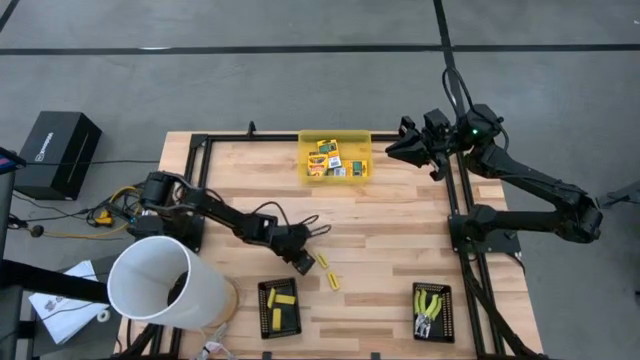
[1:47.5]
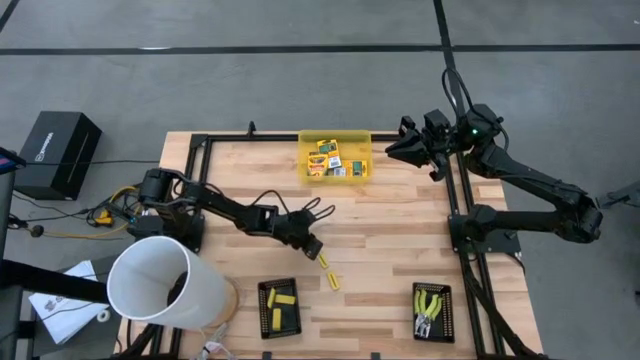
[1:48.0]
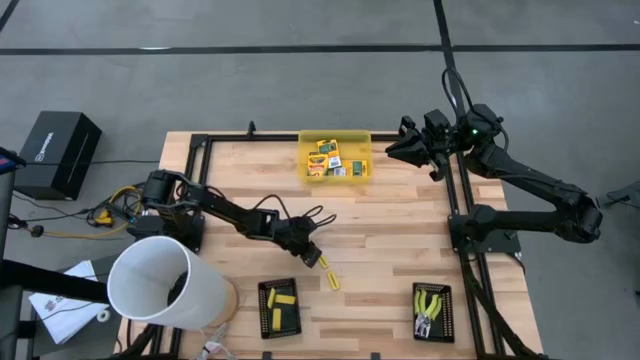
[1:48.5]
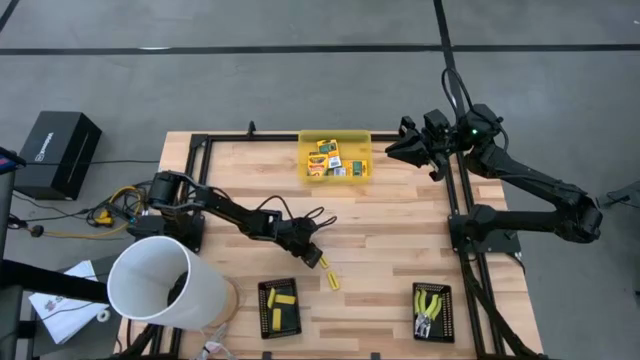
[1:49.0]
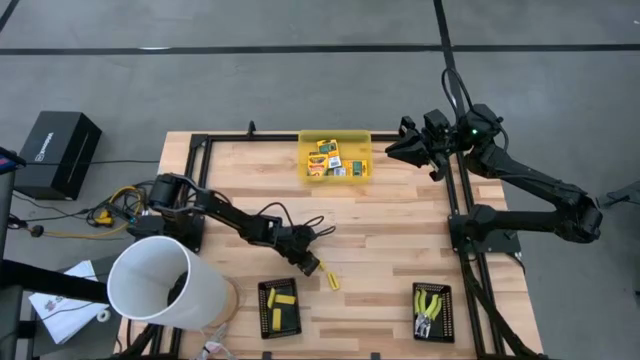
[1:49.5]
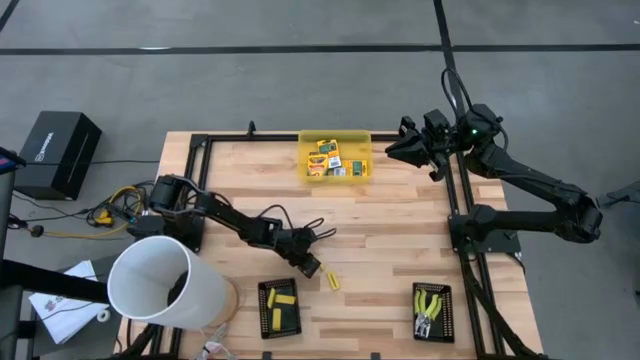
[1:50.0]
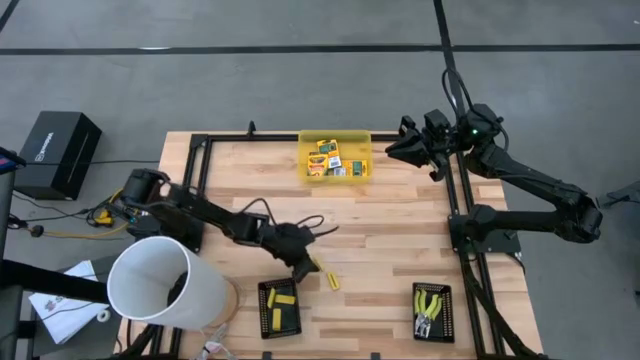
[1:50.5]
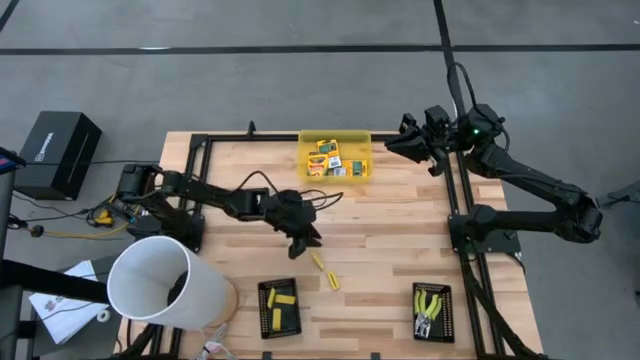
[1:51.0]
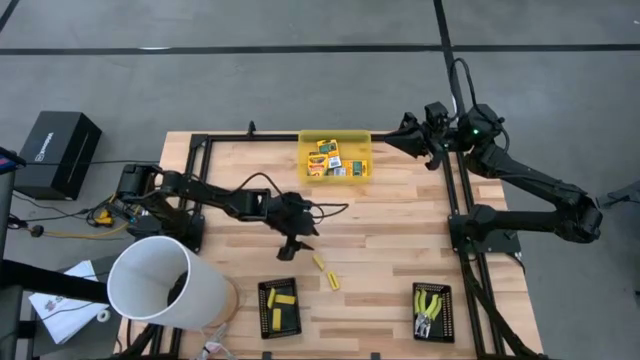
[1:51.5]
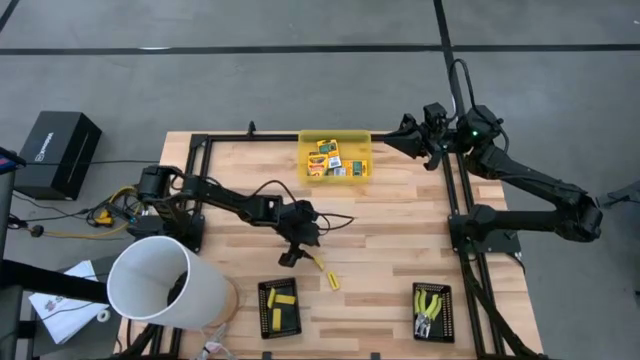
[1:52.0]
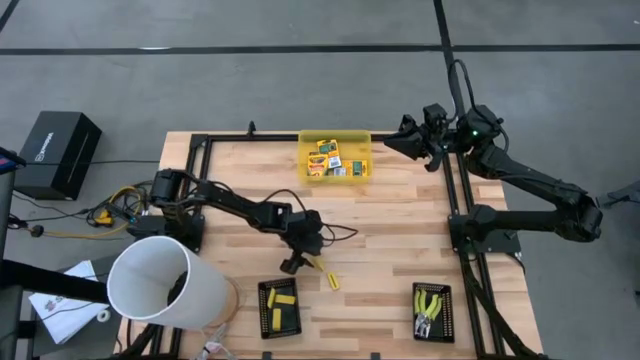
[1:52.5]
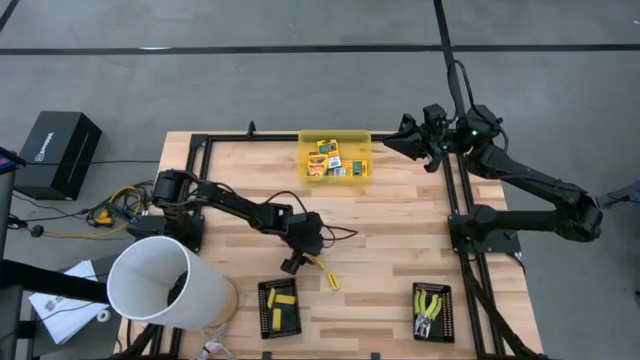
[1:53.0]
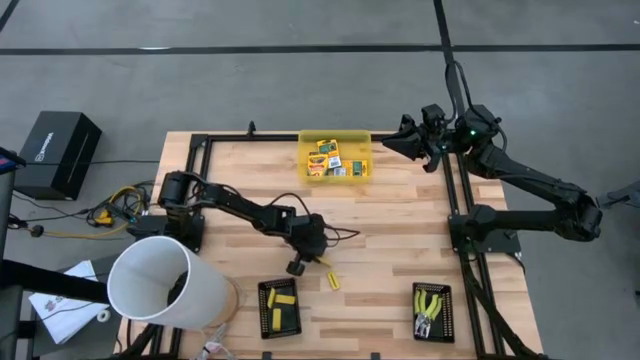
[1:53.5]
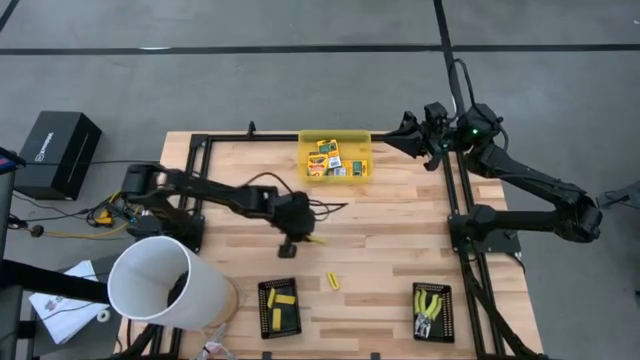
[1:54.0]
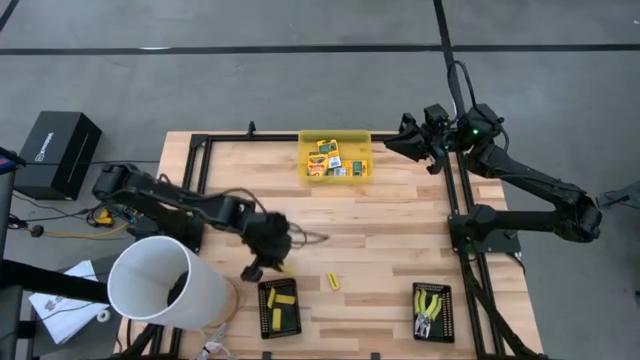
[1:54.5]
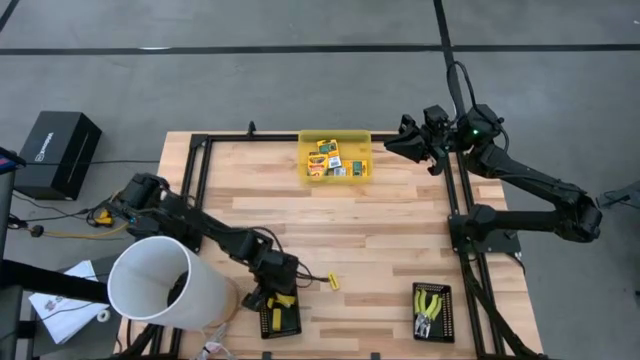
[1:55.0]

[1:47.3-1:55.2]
Task: Pick & Place School Supplies
Put the yellow eraser into the left black bin

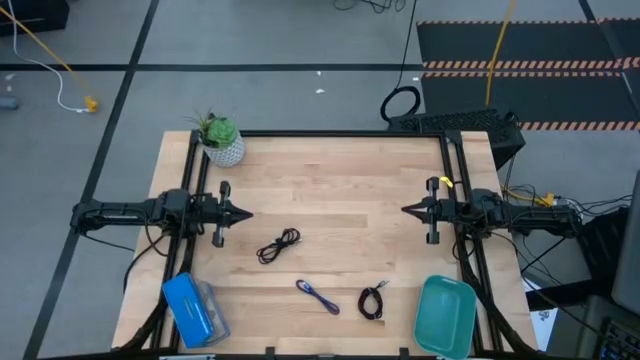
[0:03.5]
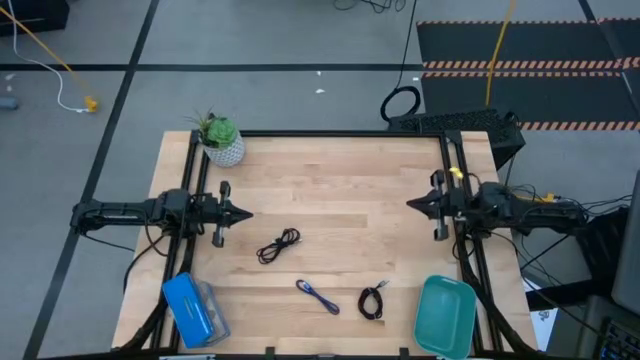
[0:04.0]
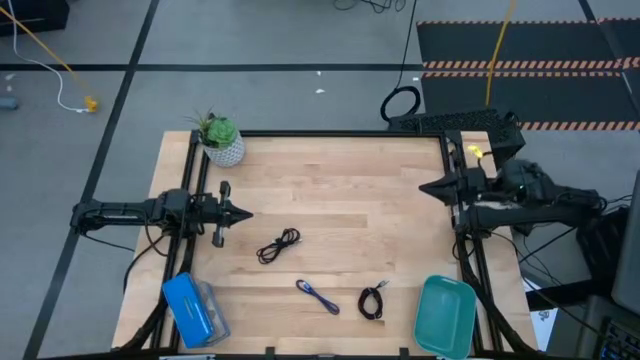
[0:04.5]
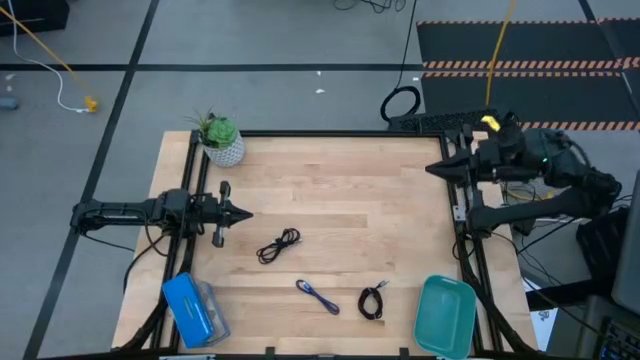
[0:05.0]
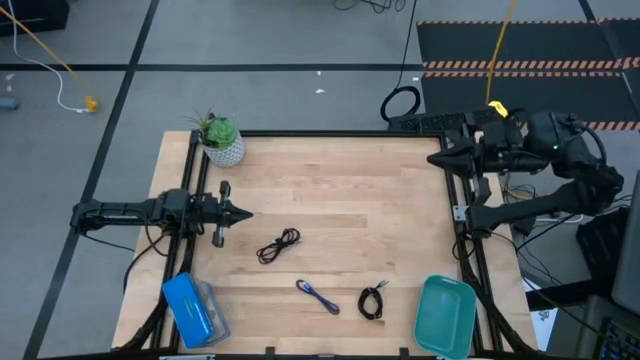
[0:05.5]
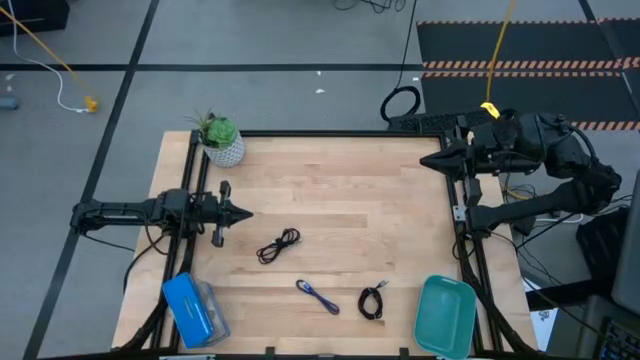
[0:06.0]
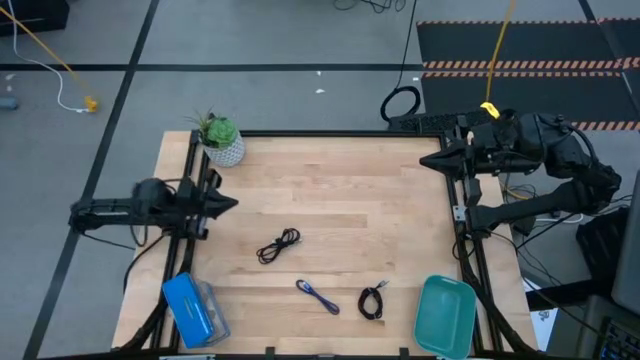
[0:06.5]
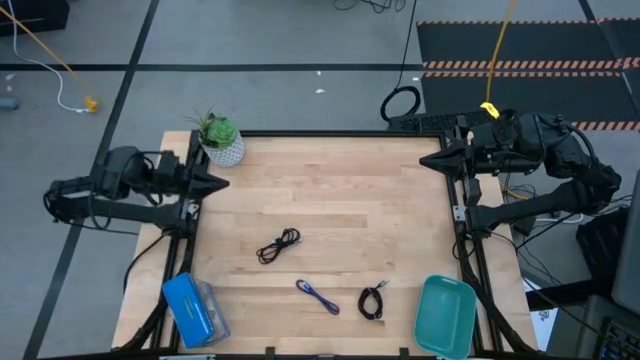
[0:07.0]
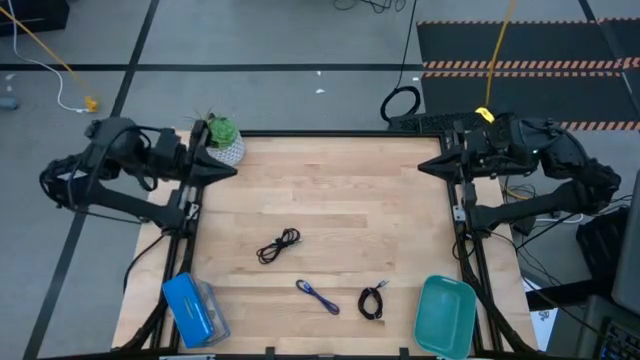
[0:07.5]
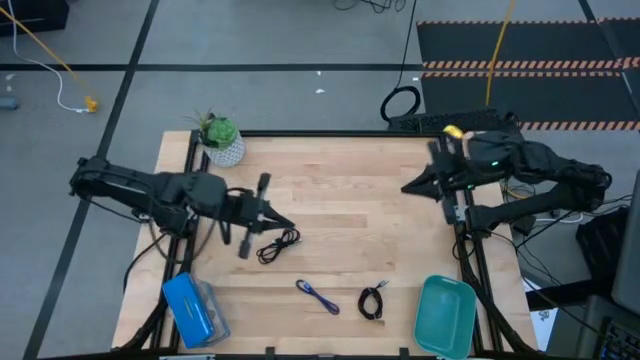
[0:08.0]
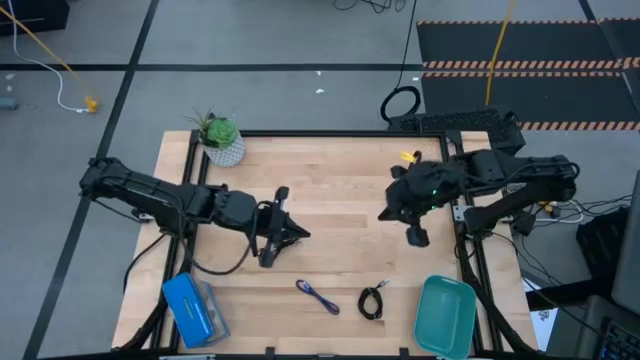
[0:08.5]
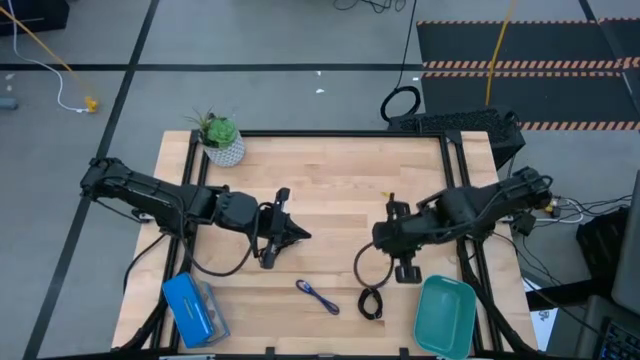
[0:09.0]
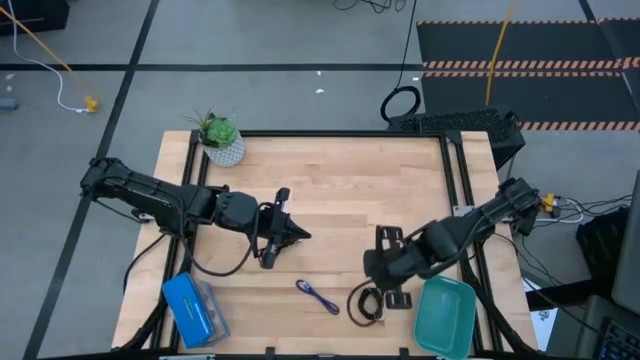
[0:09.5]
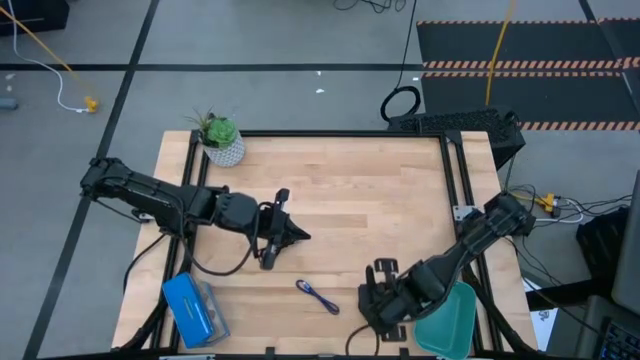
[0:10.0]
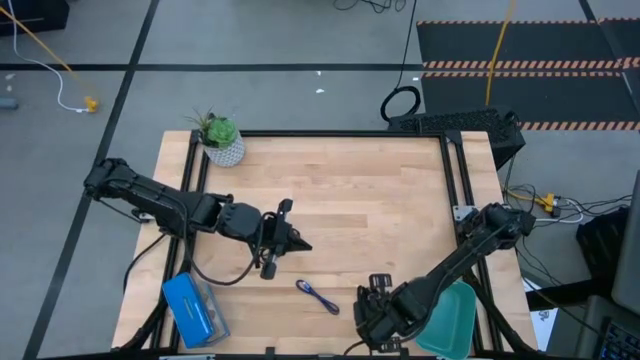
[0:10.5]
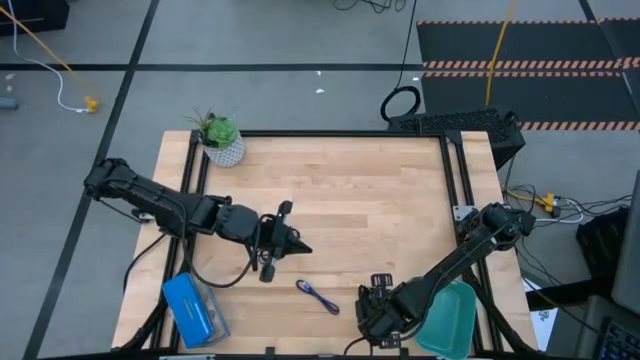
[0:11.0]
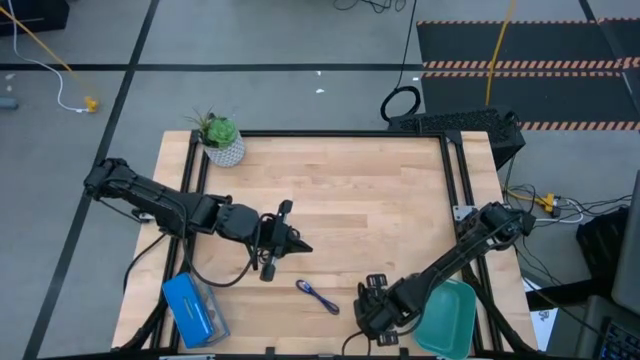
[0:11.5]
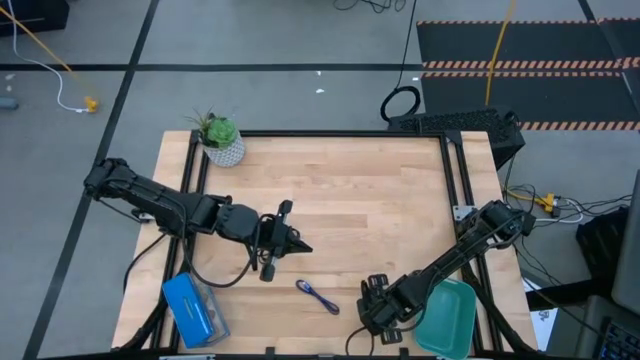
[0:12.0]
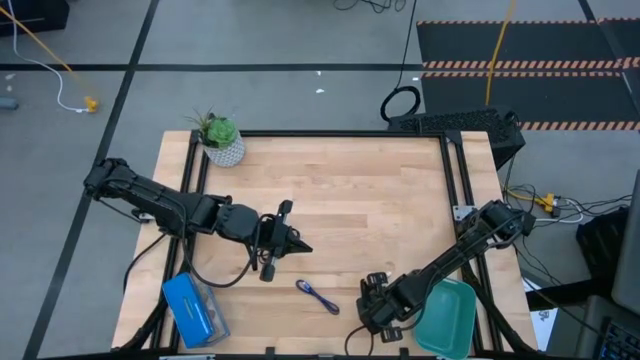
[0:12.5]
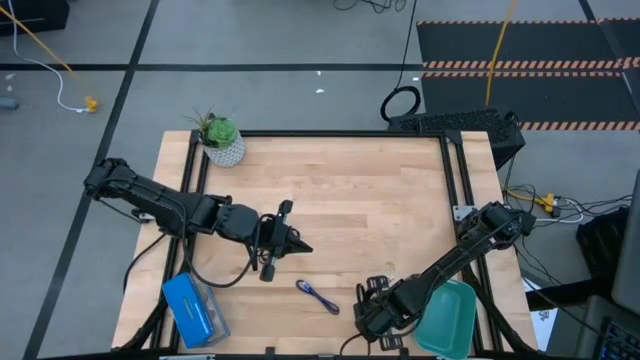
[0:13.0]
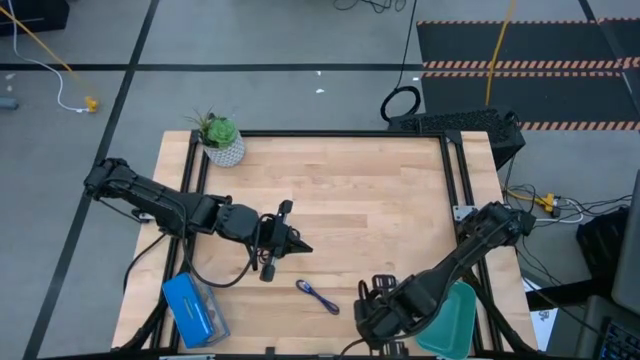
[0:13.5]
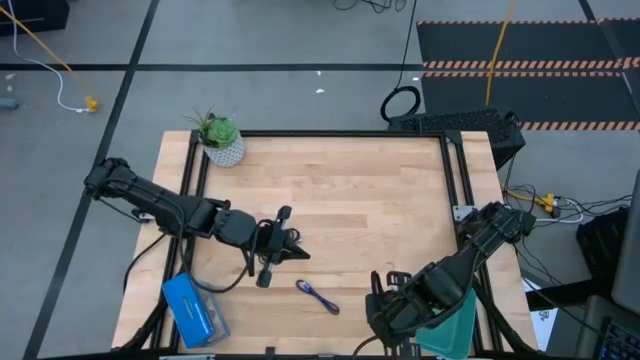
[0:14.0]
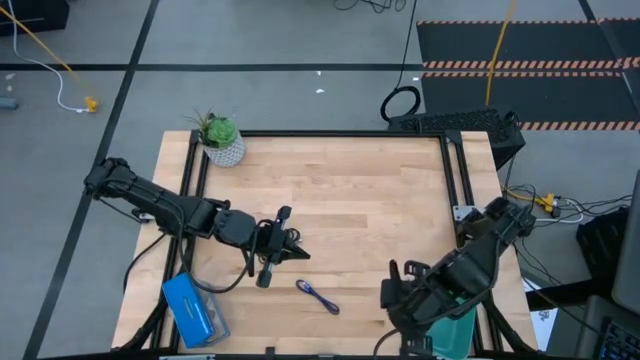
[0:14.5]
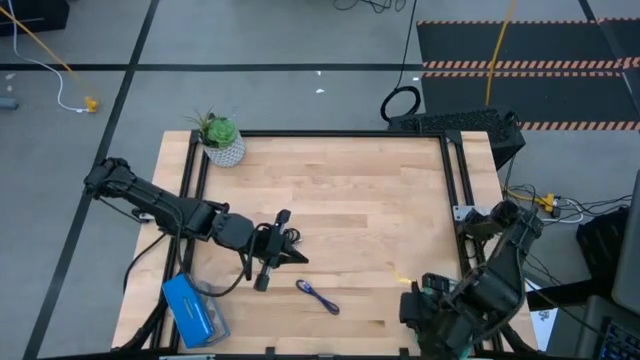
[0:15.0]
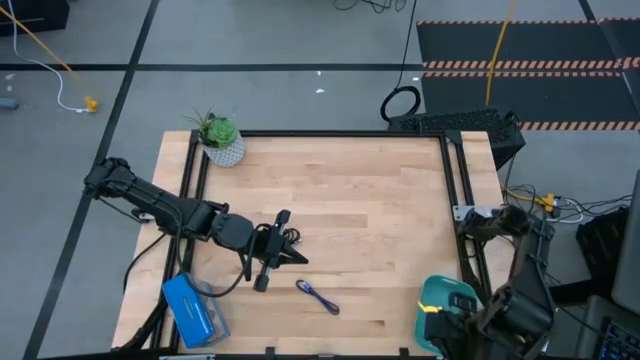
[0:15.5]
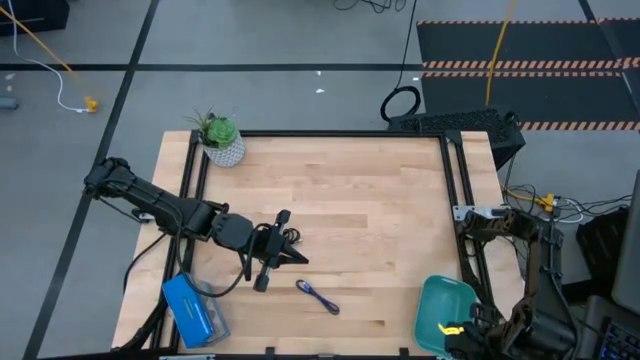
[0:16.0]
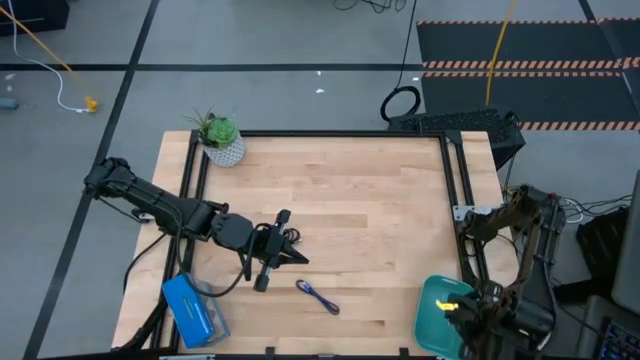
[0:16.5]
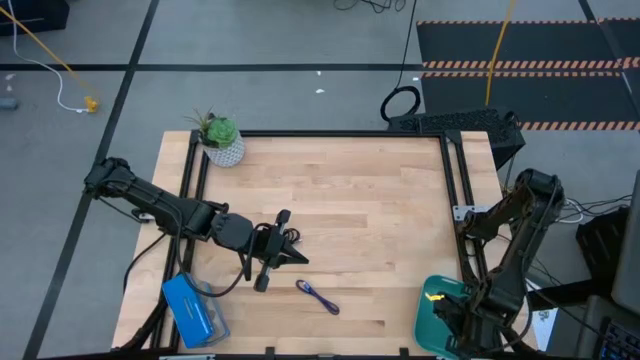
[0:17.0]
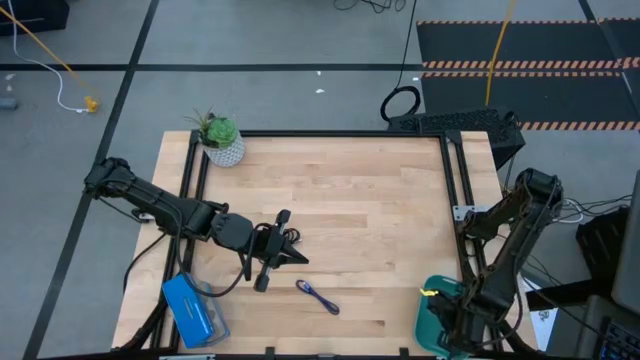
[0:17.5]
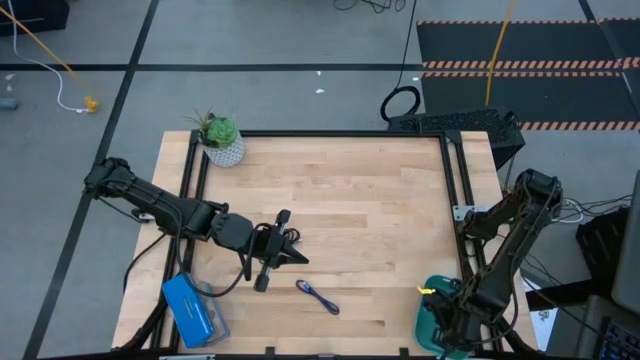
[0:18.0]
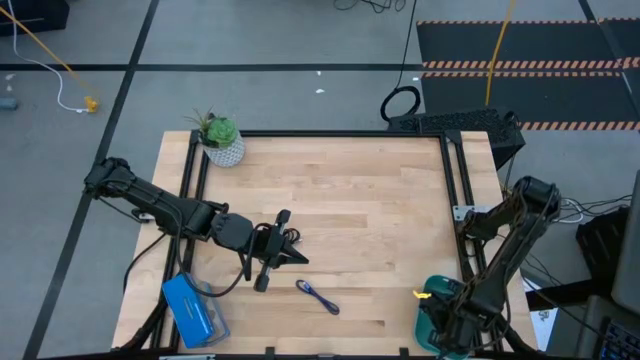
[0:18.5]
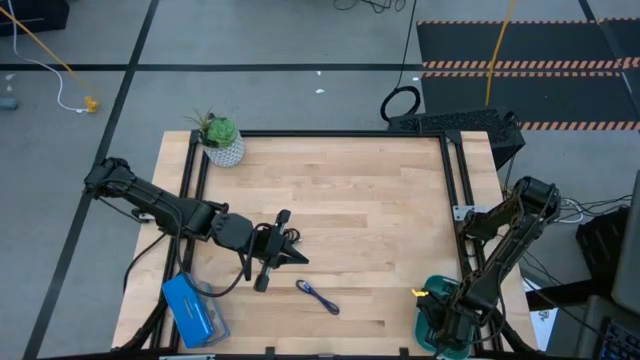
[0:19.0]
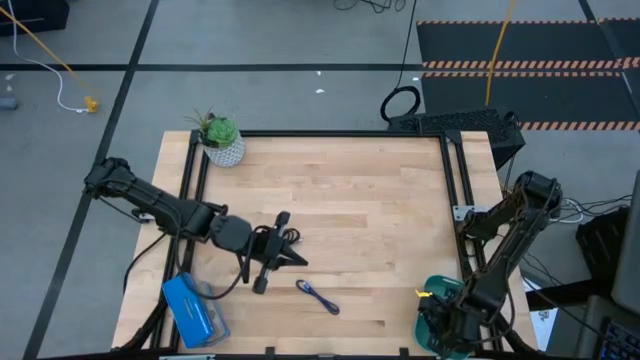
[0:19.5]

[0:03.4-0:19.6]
Task: Pick and place USB-C Cables
Put the bottom black USB cable into the green bin
